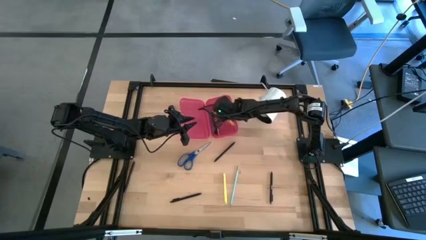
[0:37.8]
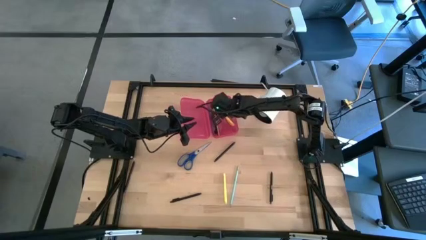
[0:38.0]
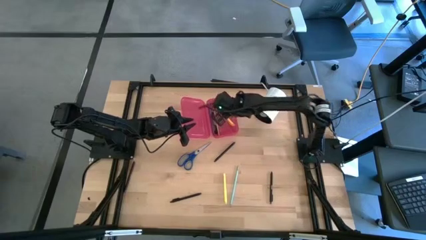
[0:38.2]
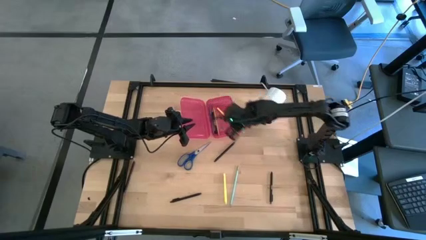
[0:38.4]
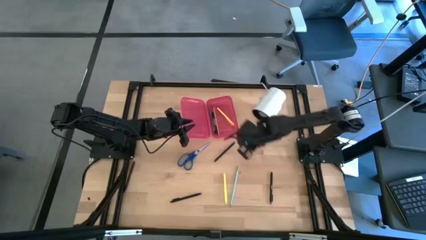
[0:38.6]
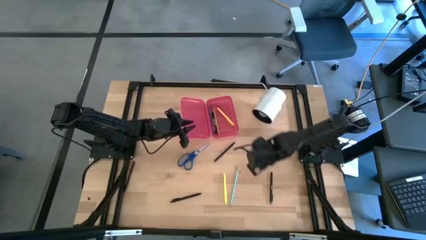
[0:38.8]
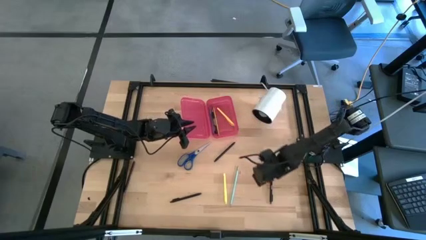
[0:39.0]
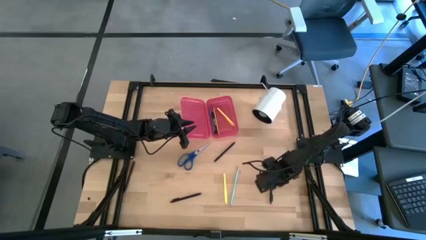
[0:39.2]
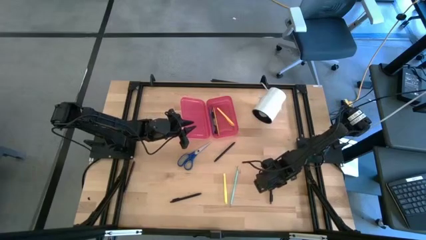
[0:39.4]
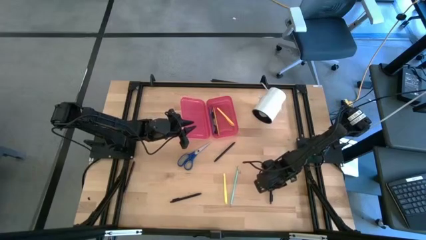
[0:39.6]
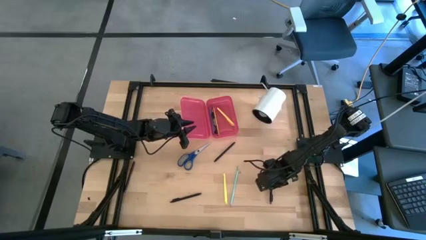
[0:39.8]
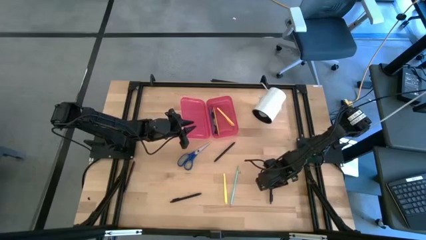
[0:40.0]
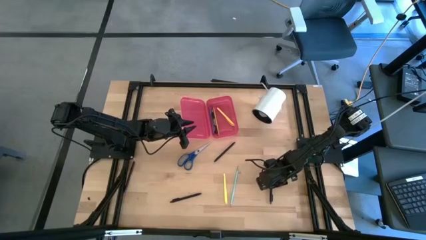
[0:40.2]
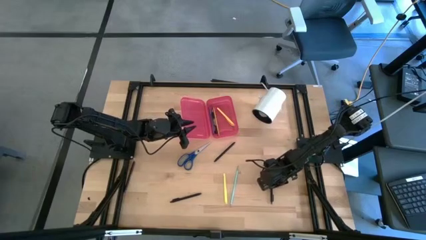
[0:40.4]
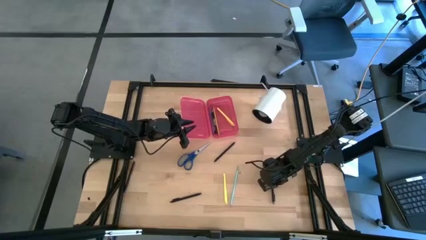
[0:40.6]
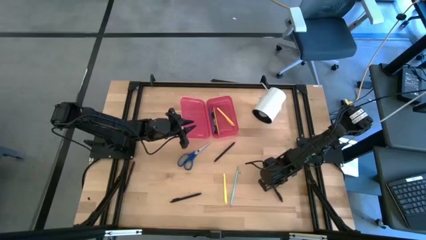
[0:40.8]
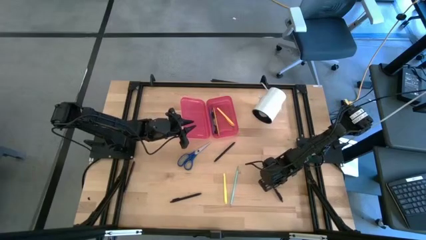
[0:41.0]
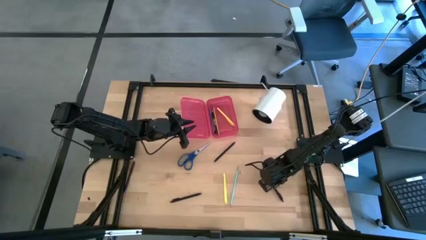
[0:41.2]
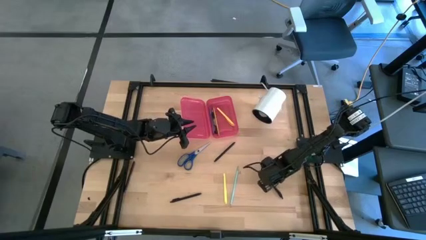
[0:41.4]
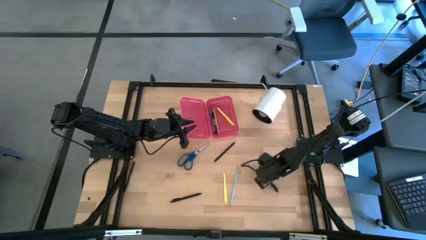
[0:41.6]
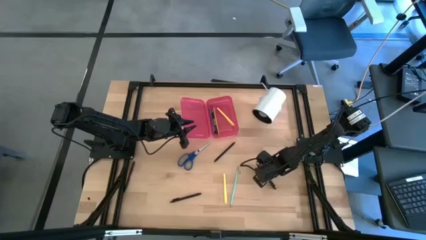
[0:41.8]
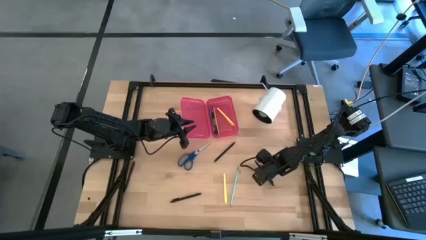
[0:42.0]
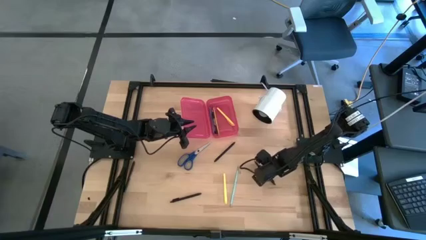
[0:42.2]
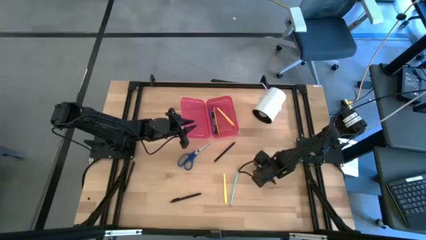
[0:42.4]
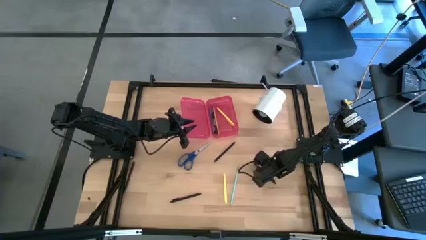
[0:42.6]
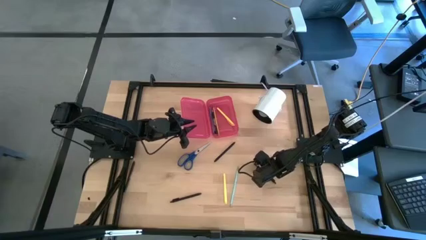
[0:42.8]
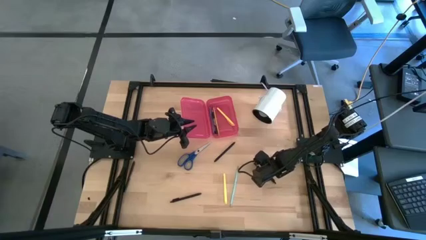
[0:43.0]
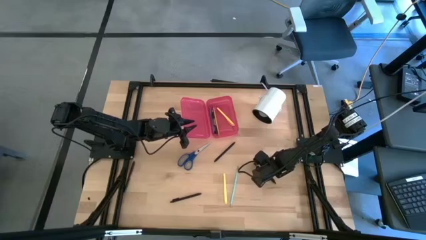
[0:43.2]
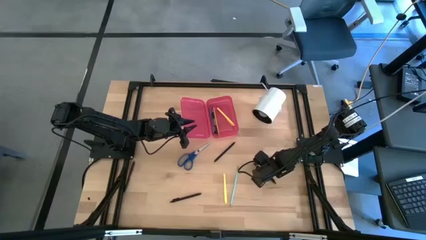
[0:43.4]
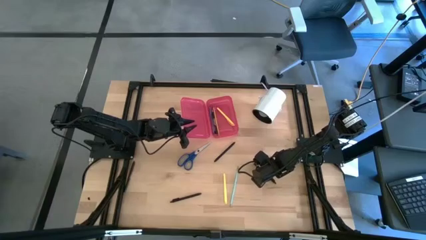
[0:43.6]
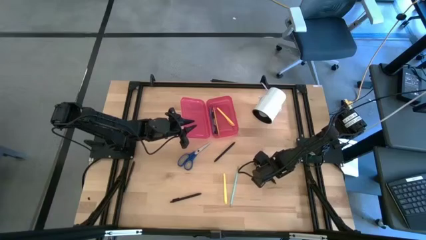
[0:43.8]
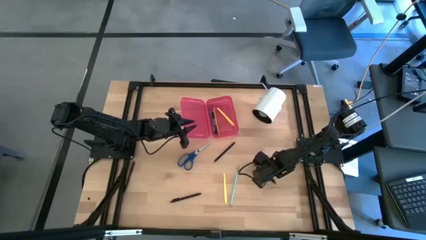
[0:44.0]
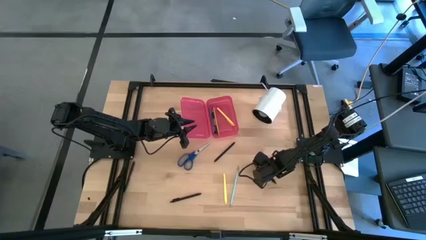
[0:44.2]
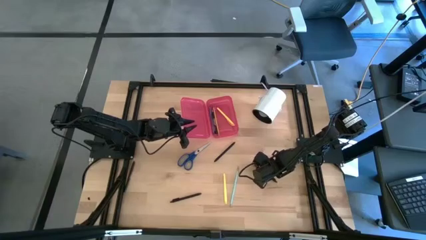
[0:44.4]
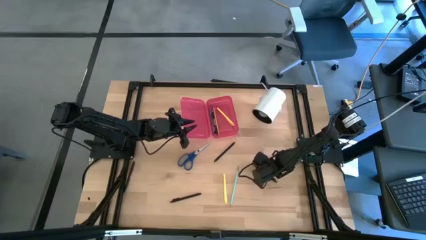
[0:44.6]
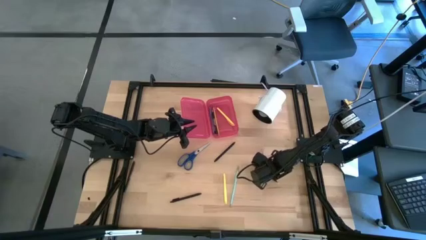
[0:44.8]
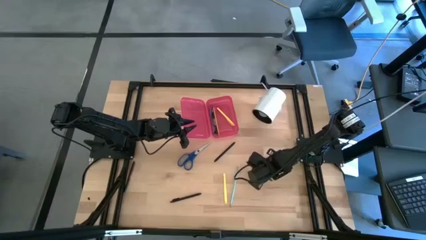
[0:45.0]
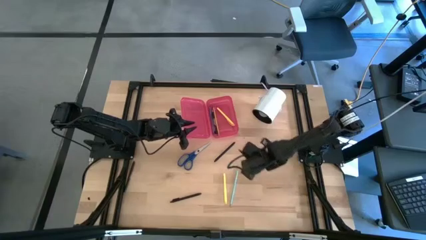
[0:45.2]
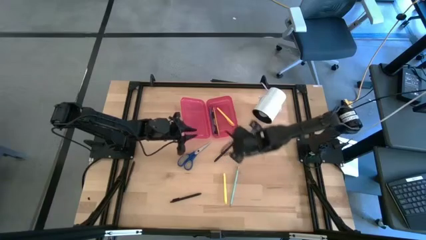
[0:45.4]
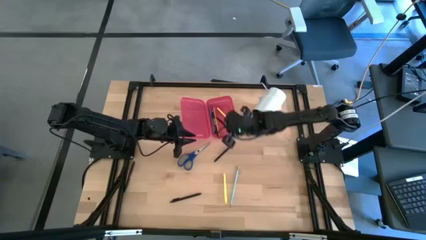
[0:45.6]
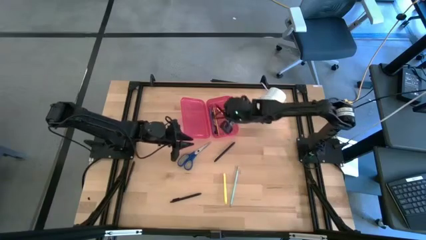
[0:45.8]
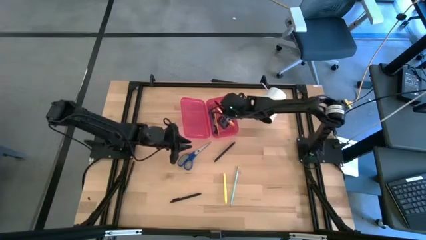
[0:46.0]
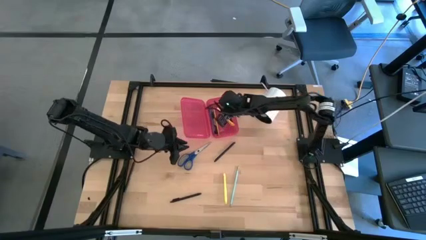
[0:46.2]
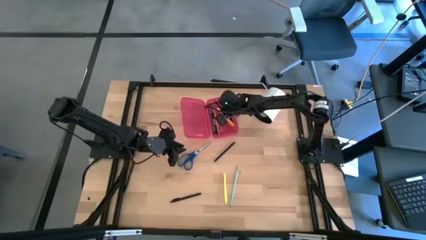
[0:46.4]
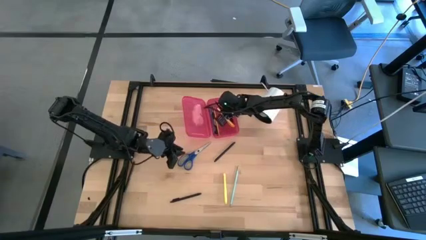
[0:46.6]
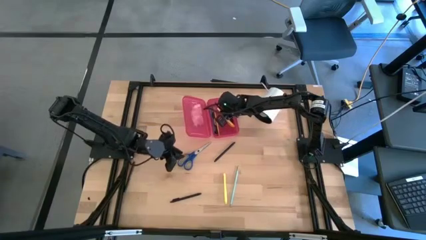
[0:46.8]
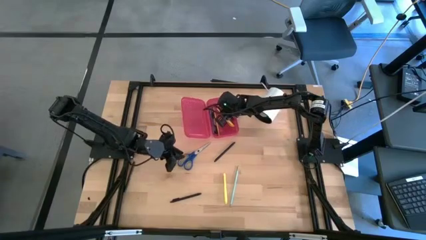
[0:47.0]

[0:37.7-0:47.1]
Task: Pick & place school supplies into a supply box
Put the black pen into the red supply box

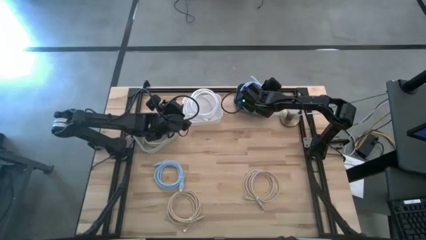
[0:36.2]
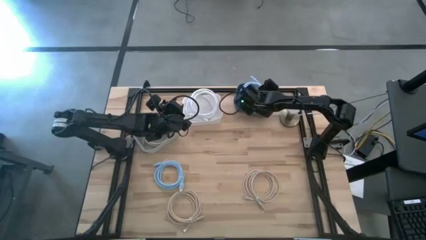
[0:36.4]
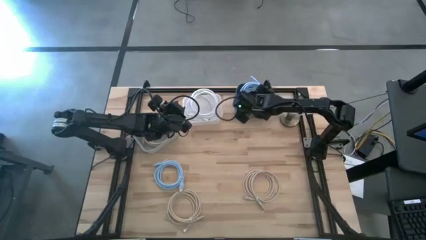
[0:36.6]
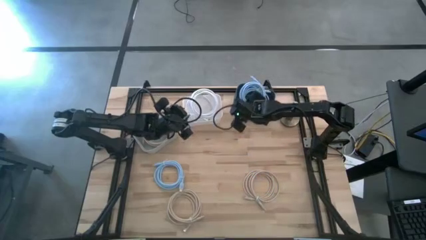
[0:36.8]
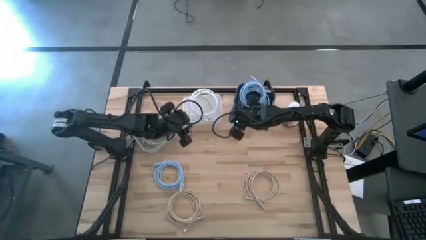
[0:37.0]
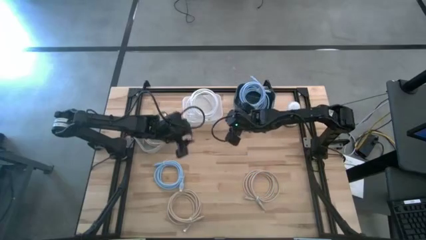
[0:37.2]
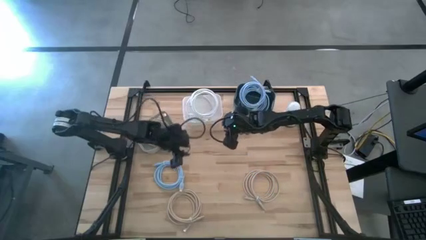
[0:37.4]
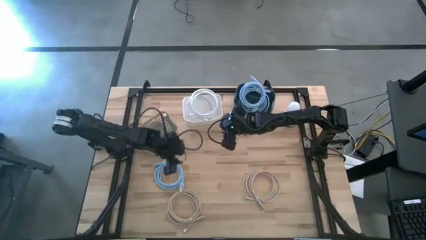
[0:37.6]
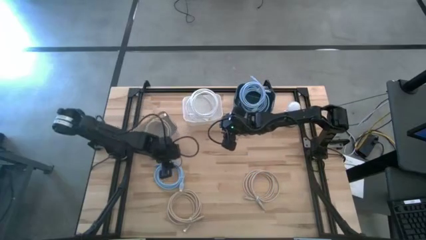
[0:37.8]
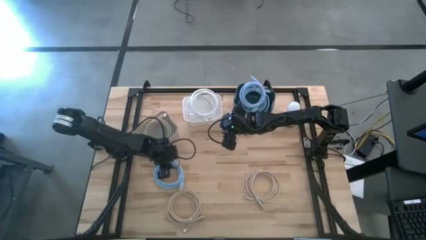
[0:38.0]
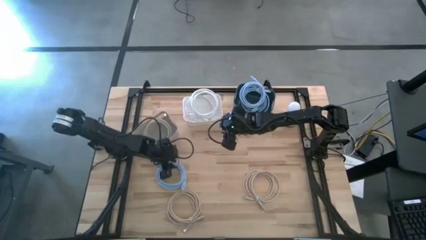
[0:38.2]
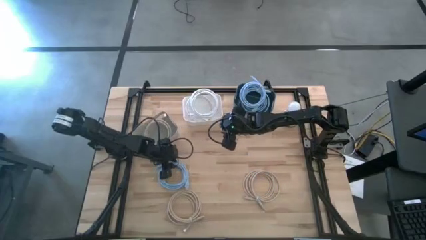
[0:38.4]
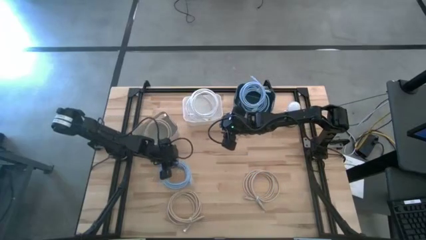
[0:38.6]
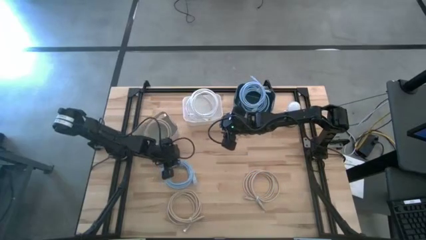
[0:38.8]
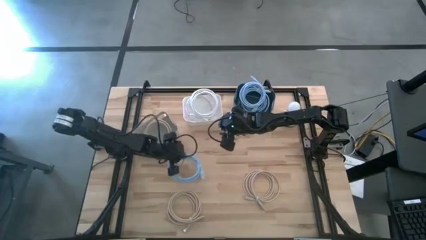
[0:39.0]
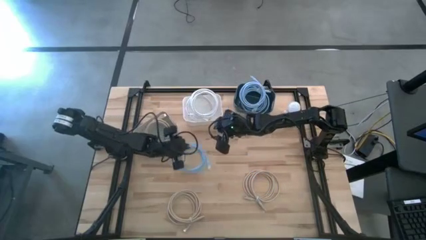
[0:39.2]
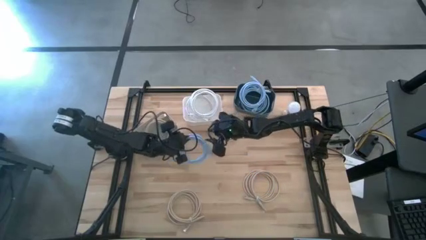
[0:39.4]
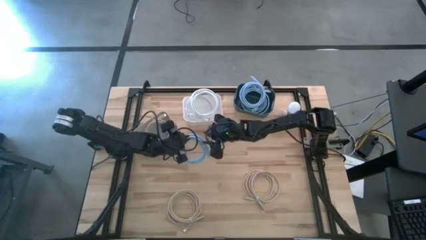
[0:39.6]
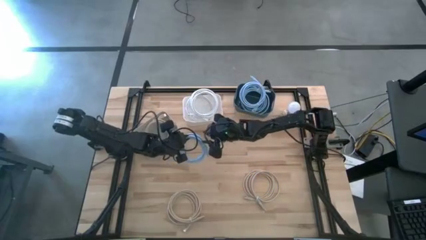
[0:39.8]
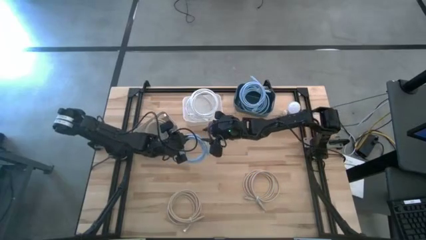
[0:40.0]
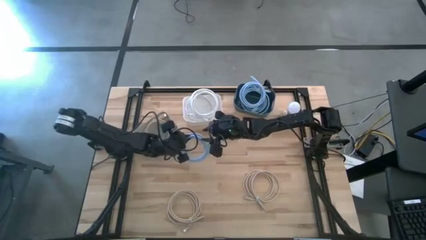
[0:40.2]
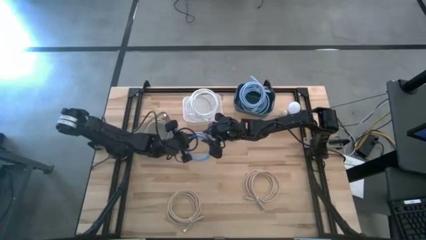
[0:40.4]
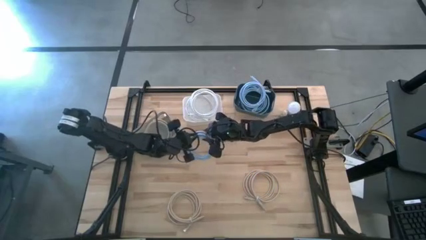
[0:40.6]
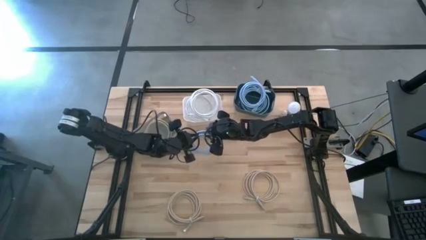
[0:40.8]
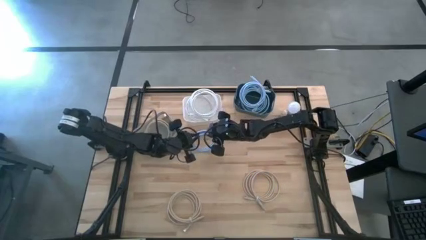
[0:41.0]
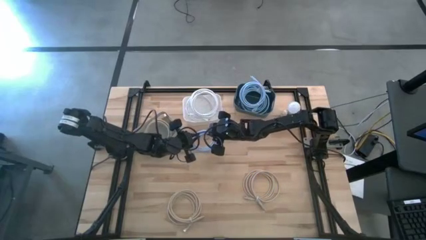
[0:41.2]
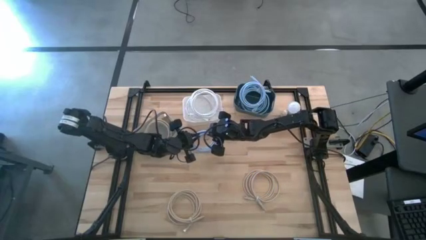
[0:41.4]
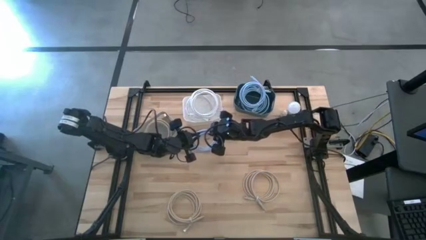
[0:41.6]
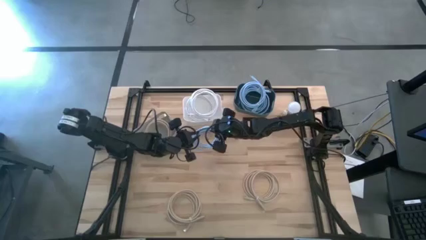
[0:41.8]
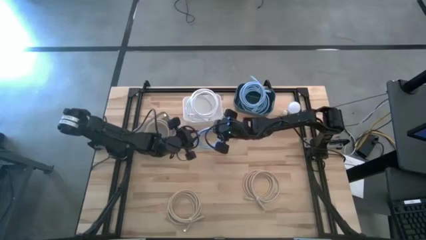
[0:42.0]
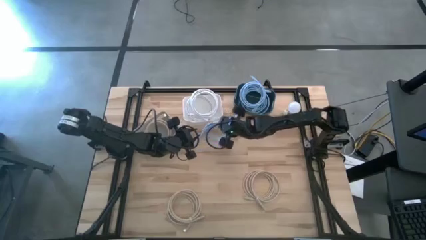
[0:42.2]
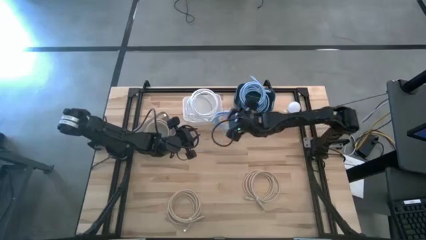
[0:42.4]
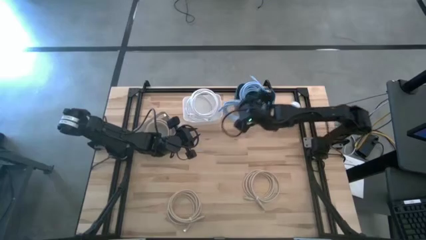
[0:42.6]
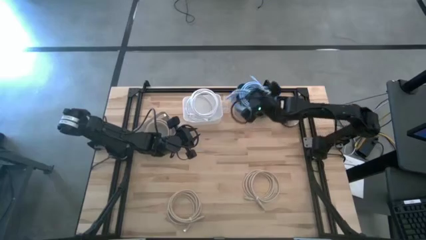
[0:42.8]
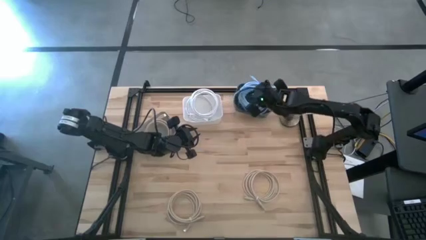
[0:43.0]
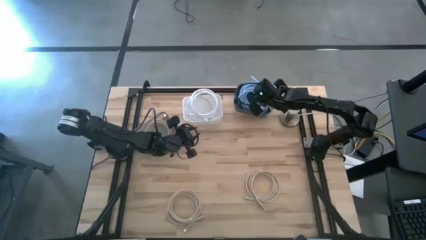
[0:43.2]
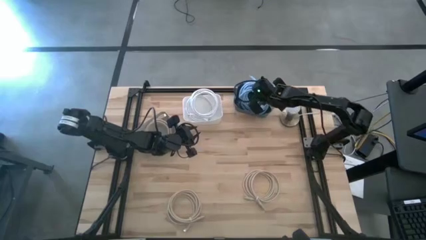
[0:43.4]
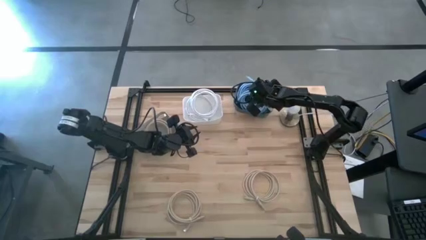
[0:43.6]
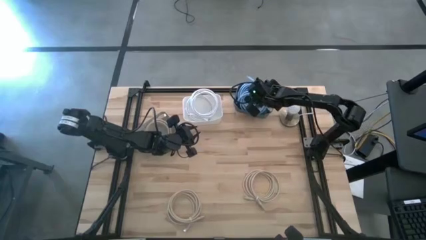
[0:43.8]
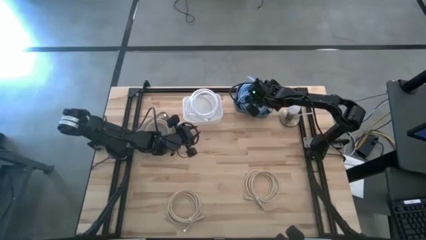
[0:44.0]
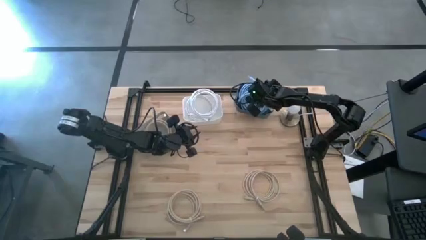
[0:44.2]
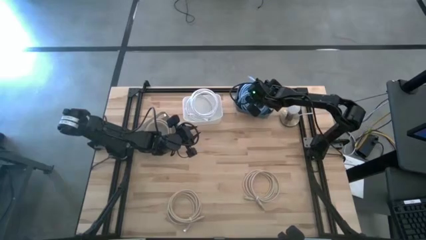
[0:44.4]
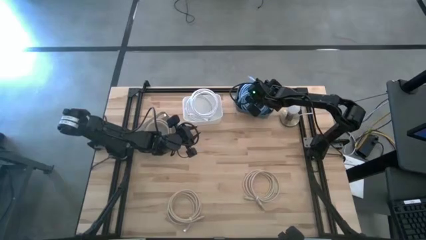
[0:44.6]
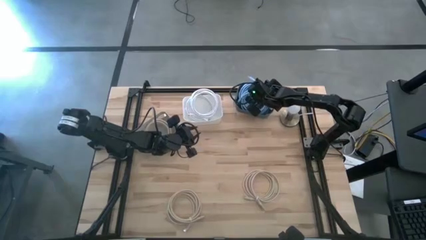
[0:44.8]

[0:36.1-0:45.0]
Task: Pick & Place USB Port
Put the blue charger cable into the blue bin
